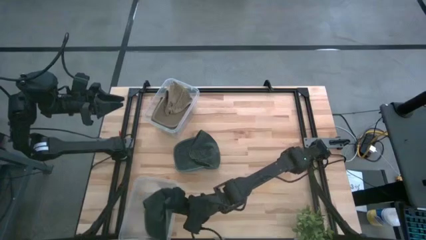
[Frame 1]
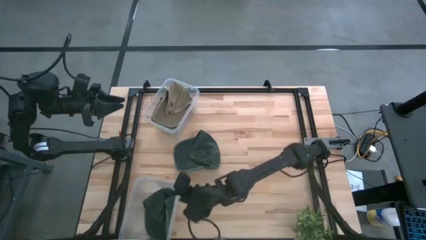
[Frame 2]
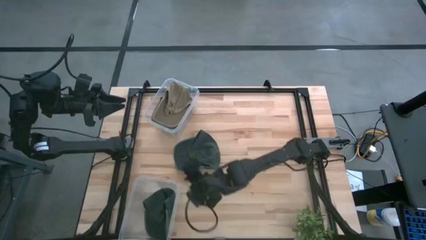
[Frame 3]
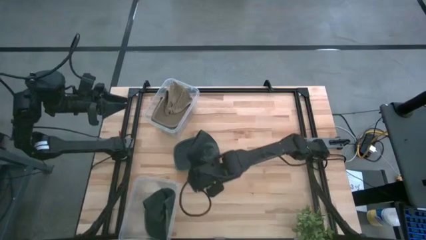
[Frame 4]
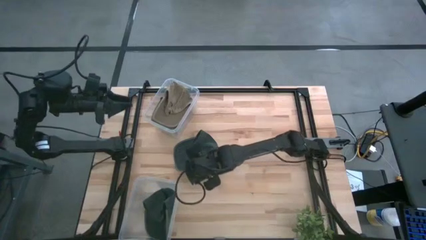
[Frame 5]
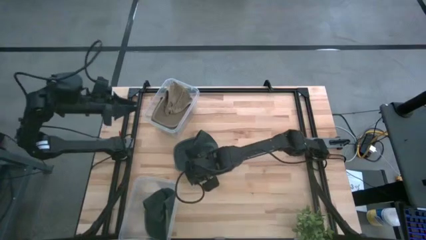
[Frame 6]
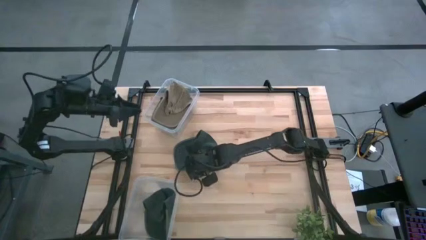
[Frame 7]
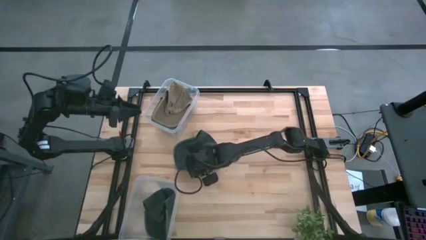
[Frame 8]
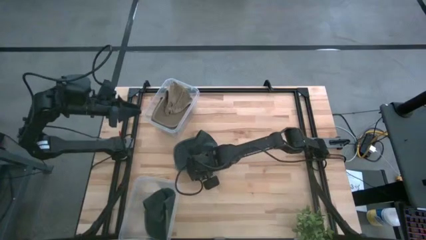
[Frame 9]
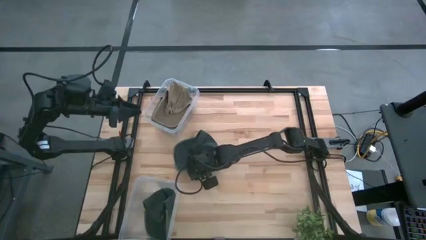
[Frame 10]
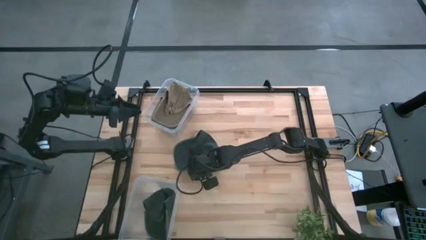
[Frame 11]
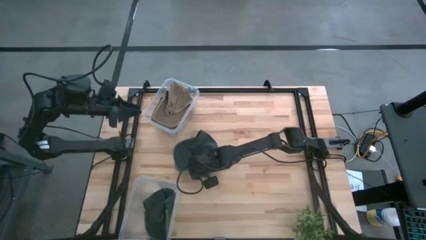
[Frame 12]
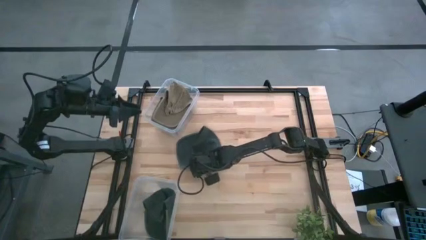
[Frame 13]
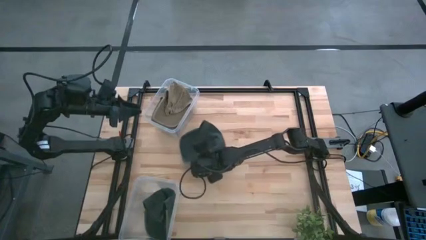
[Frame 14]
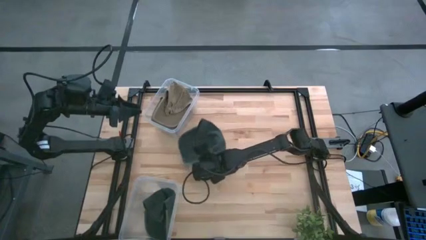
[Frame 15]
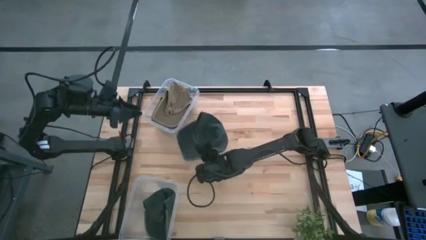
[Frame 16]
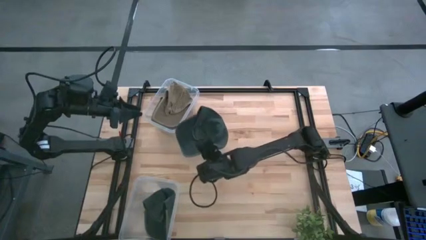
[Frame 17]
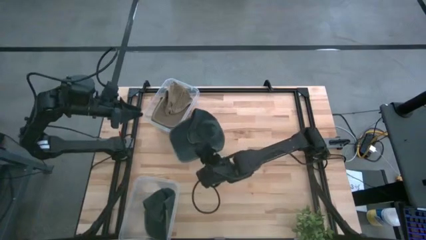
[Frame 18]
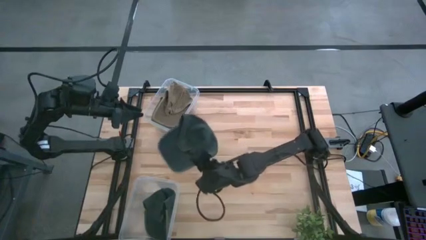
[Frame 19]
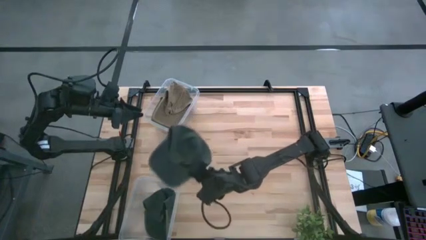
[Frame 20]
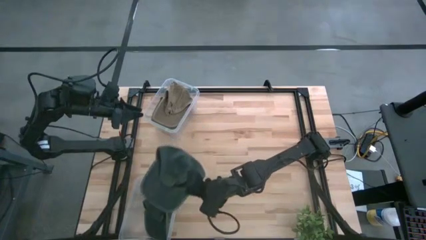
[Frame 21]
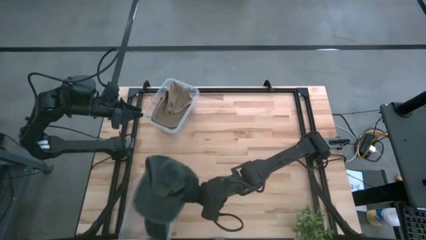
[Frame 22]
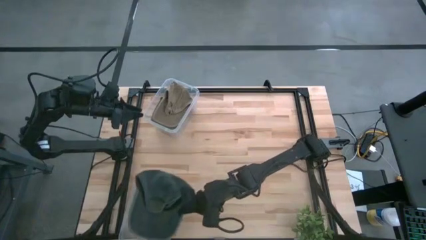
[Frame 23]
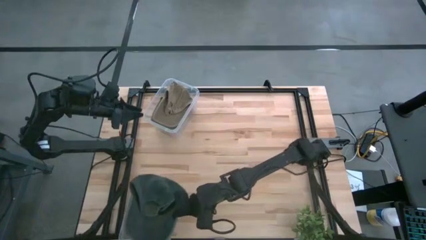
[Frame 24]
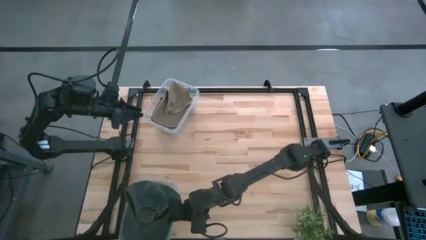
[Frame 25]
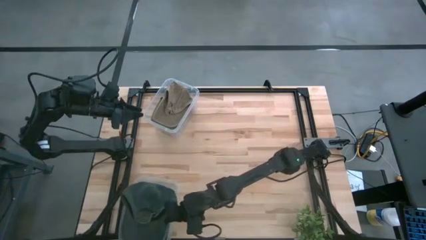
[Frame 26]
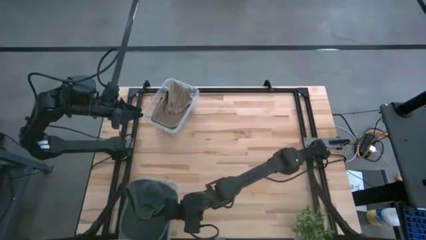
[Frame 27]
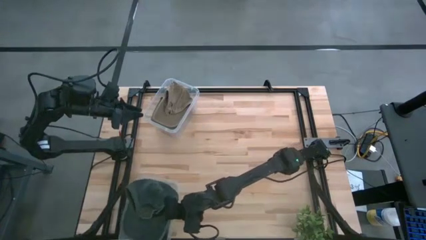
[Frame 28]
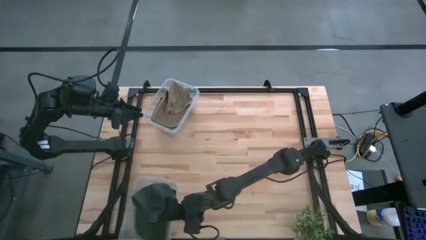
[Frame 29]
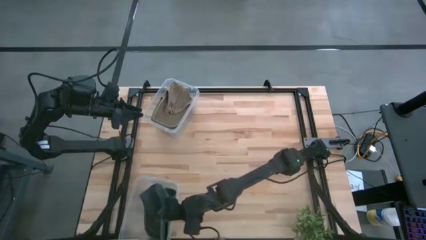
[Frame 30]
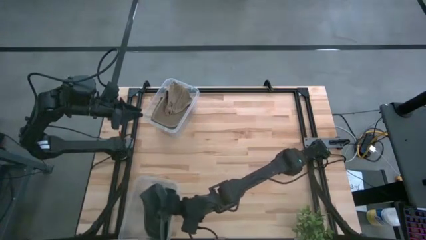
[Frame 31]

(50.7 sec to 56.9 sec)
Task: Pick and place caps into container
Put the black cap into the bottom transparent container

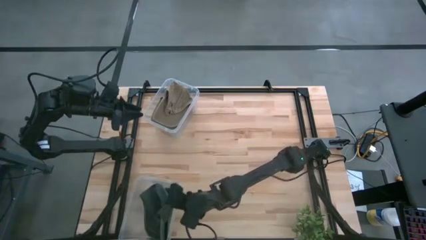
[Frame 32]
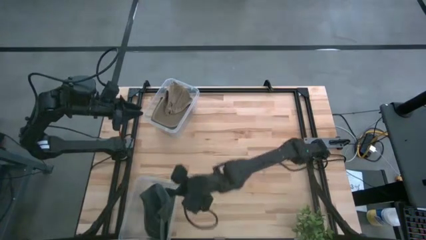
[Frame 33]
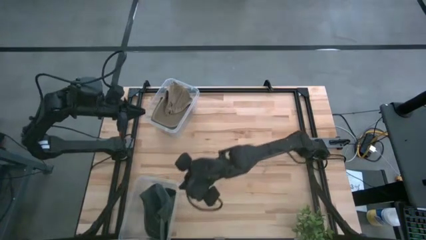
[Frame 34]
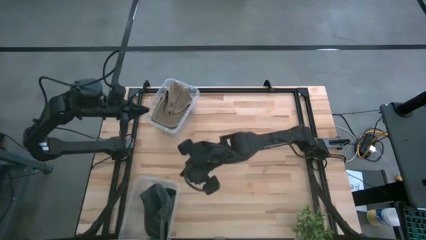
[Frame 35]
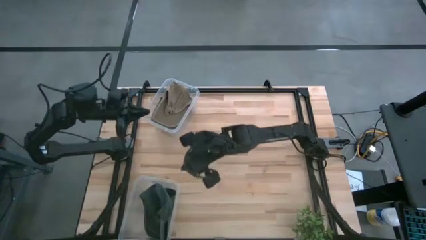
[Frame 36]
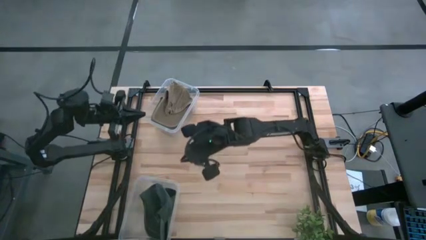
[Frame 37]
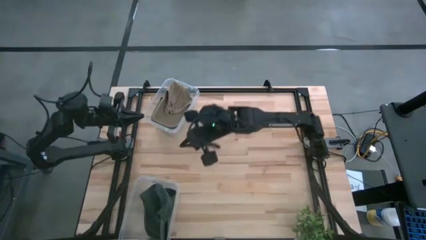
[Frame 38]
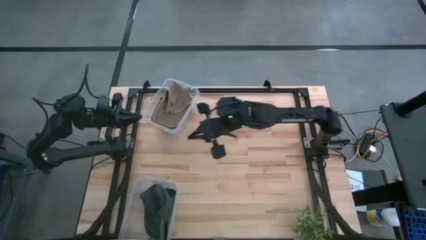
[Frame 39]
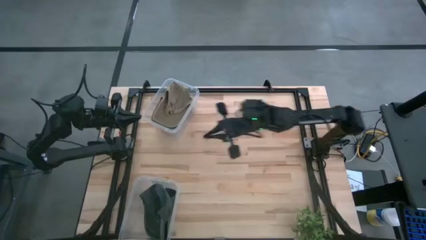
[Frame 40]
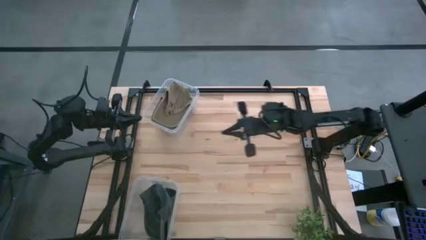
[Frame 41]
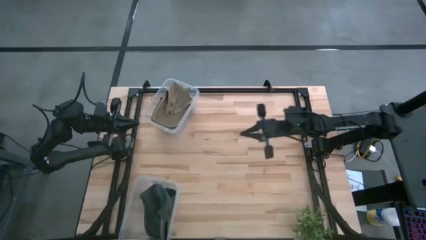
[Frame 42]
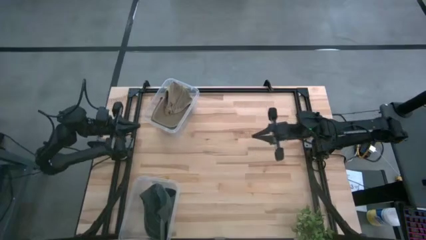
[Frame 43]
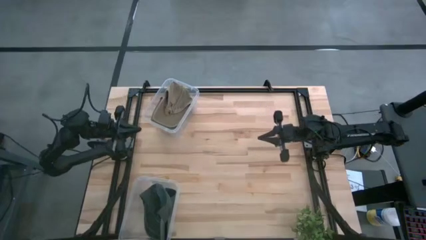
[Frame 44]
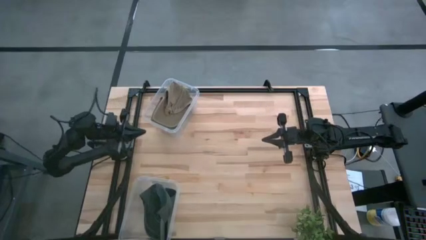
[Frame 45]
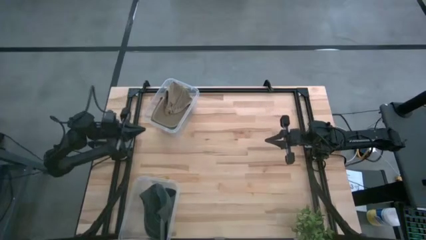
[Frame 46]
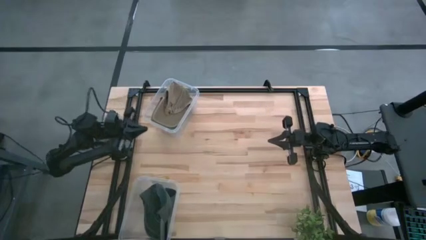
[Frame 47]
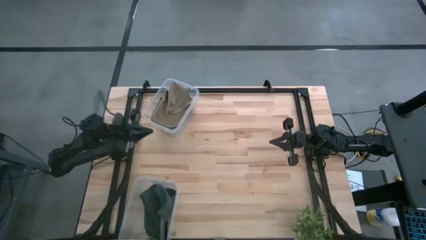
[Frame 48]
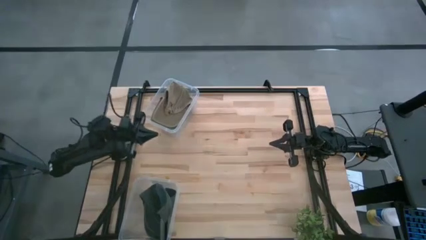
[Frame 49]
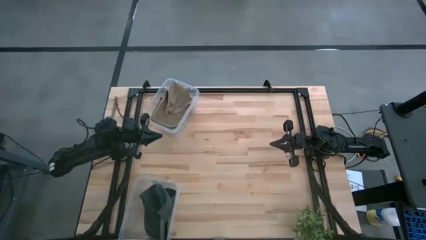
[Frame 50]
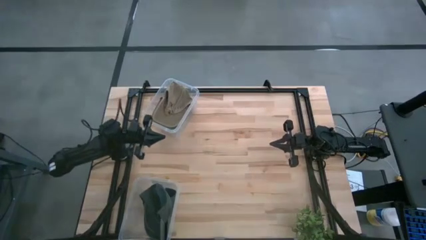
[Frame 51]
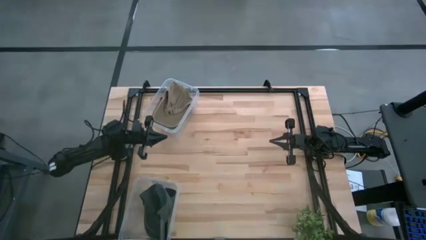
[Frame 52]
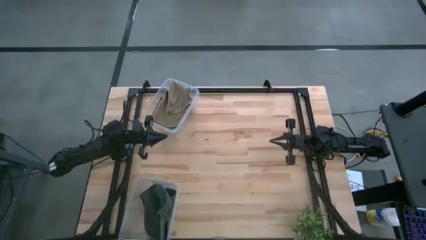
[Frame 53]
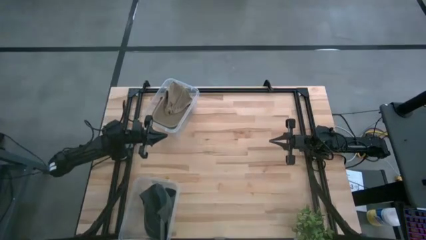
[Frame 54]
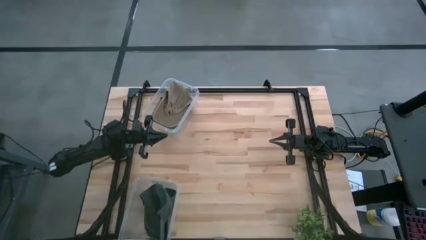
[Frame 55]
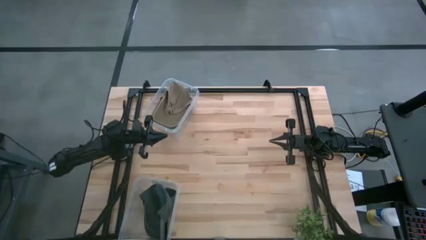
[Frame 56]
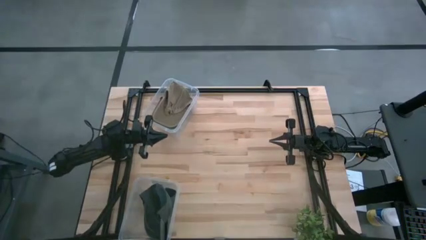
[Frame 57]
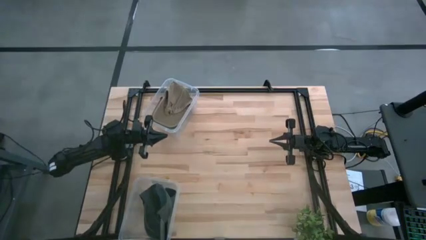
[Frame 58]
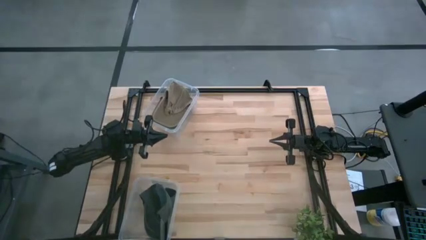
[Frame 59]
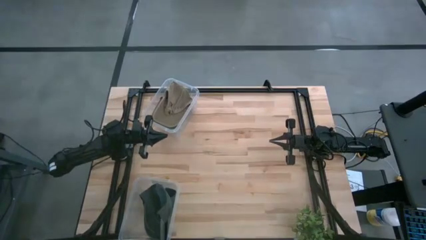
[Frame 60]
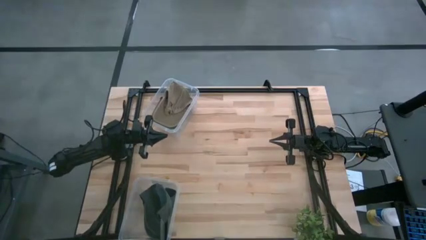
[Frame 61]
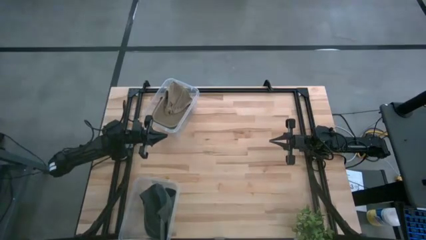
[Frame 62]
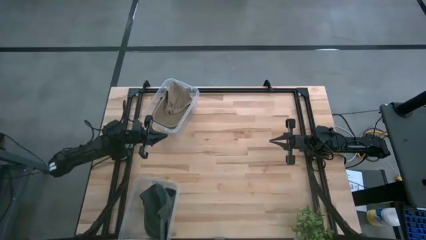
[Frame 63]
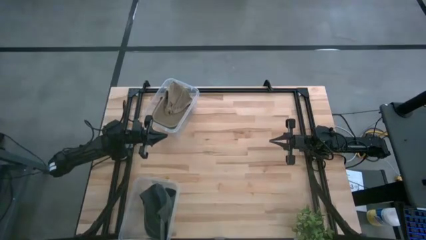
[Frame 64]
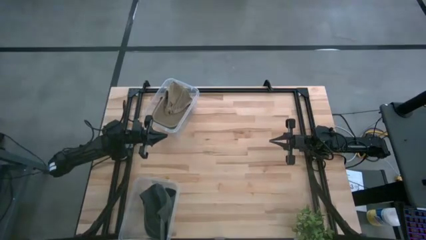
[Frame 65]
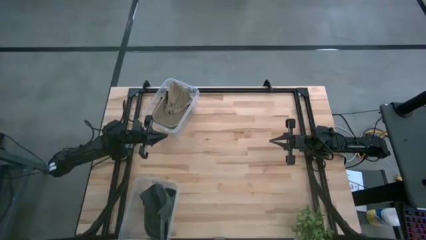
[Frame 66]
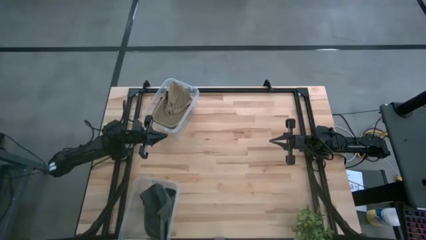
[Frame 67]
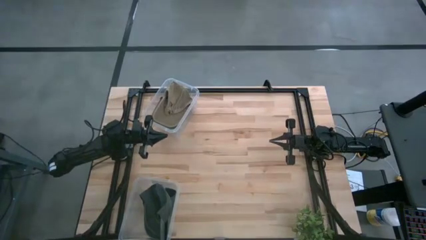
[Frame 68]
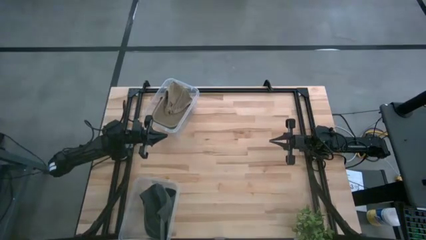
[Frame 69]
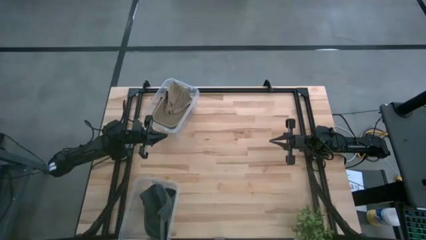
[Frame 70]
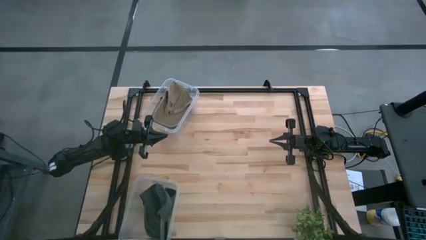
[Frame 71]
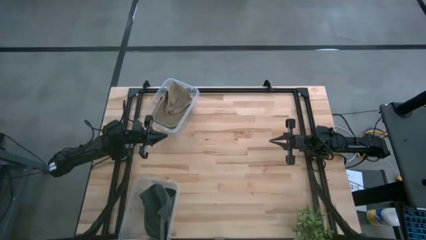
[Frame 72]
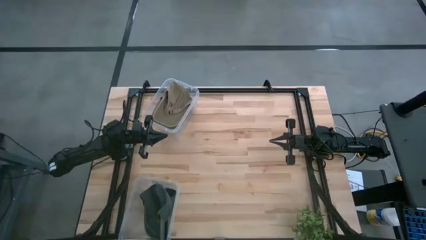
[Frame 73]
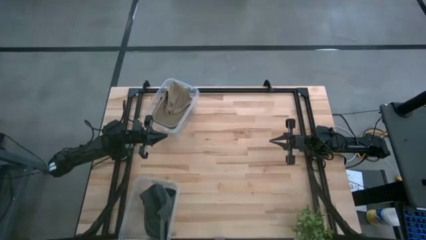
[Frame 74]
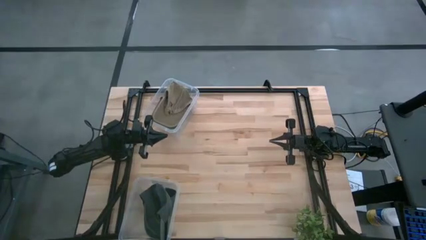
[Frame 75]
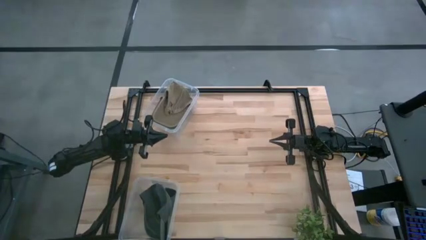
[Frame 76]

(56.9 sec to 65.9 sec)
Return to Home Position
